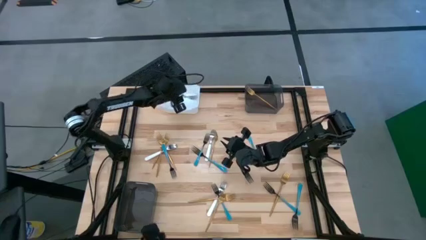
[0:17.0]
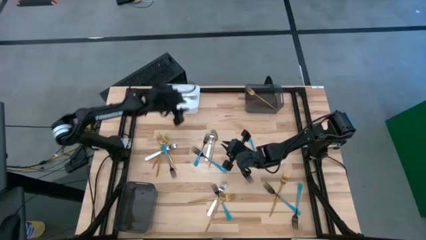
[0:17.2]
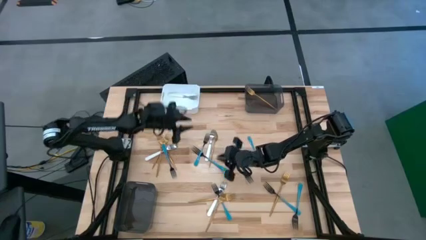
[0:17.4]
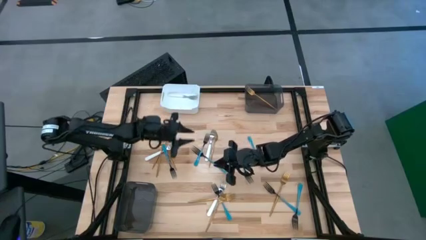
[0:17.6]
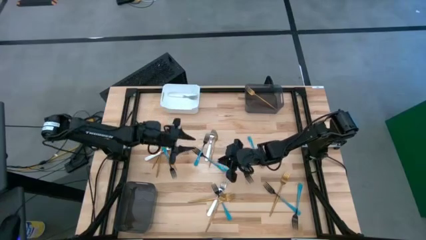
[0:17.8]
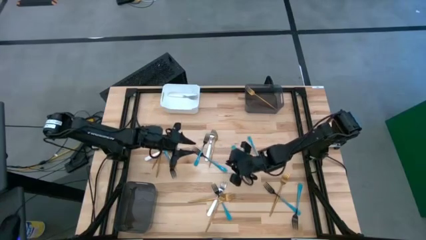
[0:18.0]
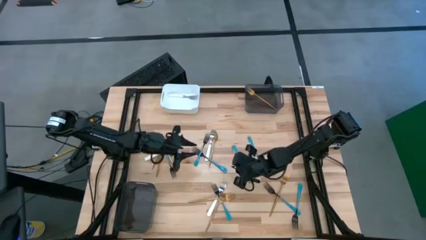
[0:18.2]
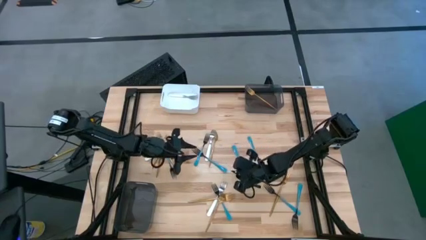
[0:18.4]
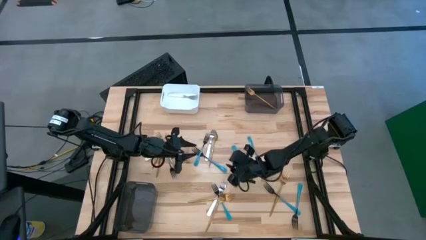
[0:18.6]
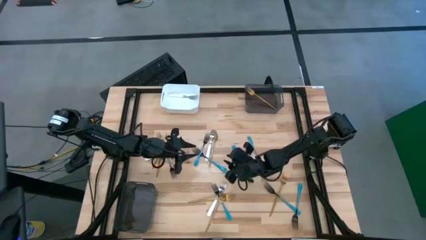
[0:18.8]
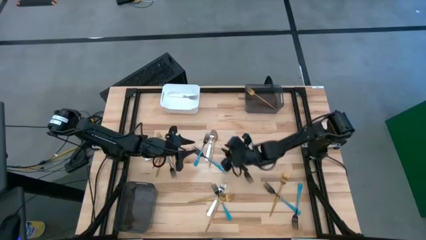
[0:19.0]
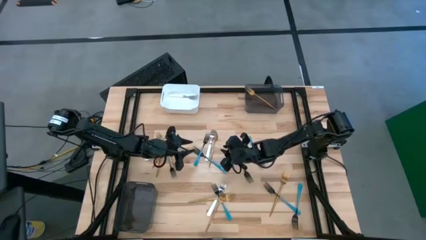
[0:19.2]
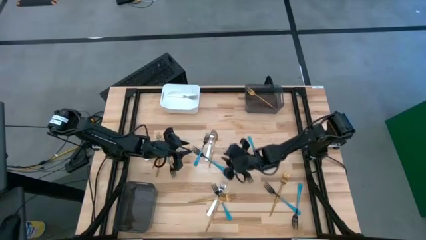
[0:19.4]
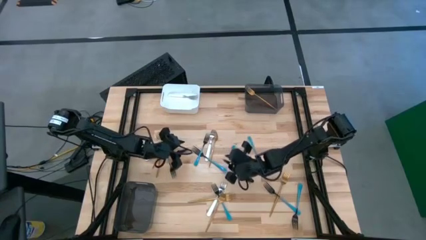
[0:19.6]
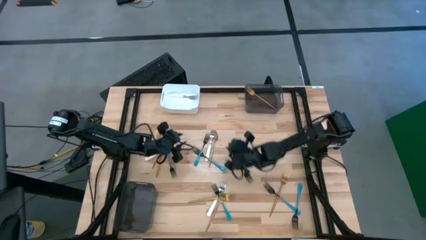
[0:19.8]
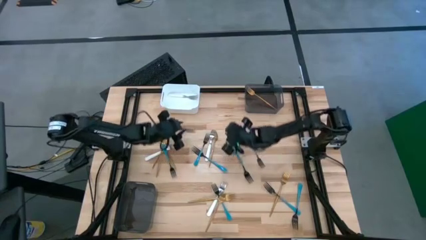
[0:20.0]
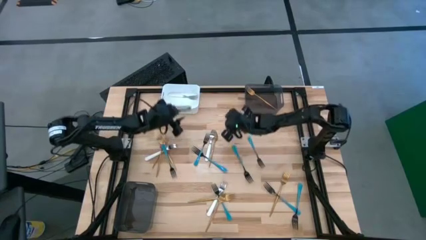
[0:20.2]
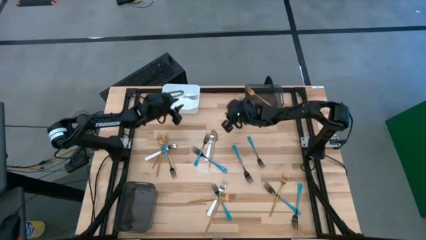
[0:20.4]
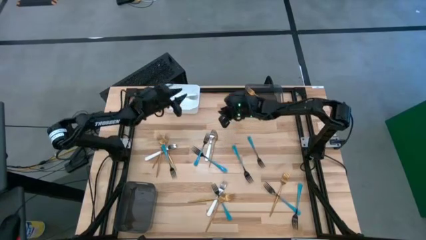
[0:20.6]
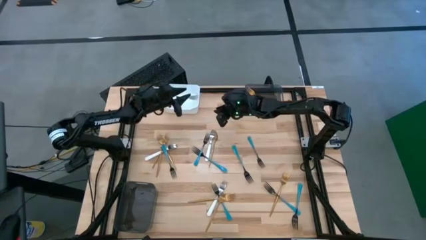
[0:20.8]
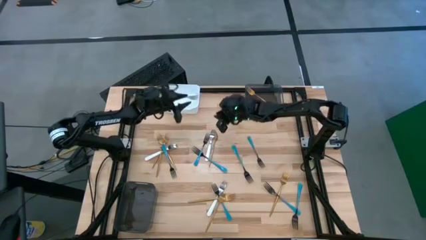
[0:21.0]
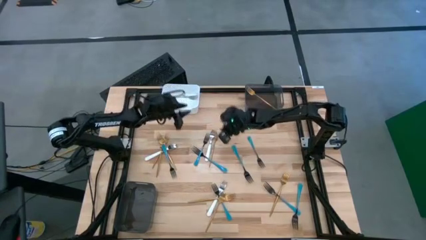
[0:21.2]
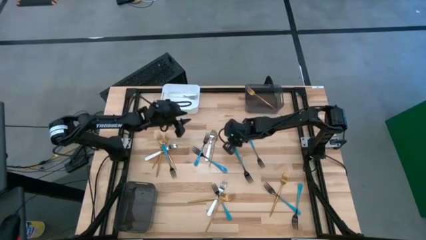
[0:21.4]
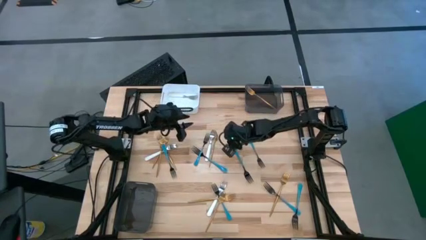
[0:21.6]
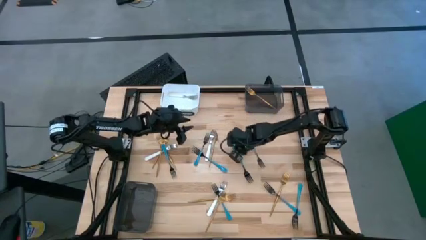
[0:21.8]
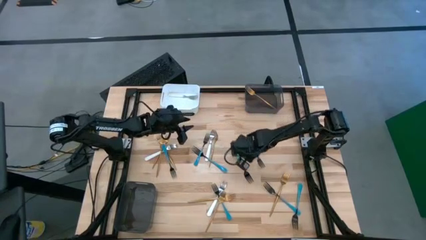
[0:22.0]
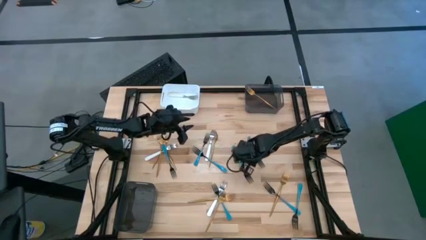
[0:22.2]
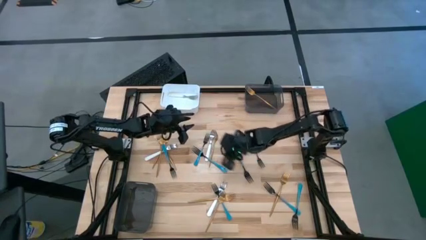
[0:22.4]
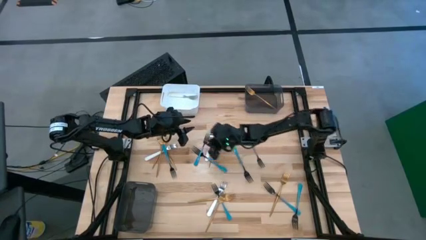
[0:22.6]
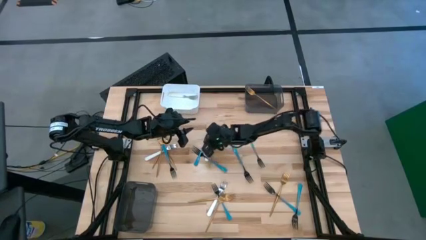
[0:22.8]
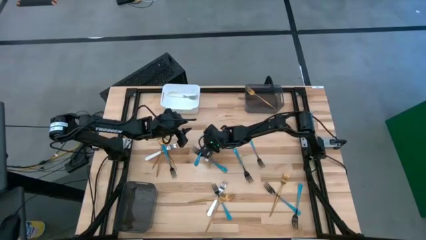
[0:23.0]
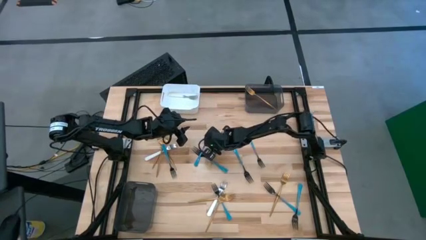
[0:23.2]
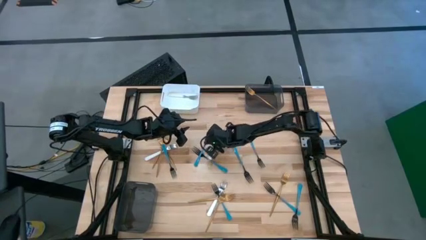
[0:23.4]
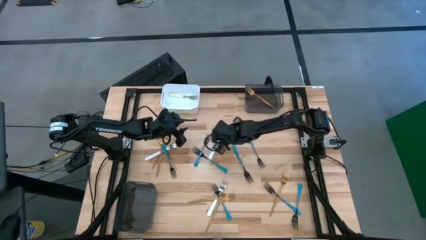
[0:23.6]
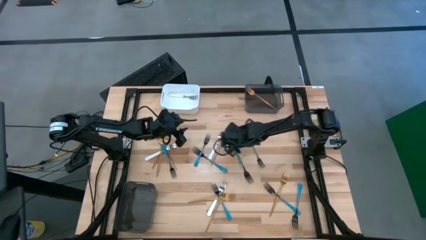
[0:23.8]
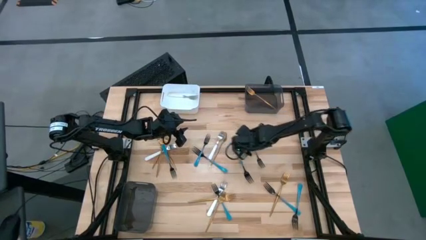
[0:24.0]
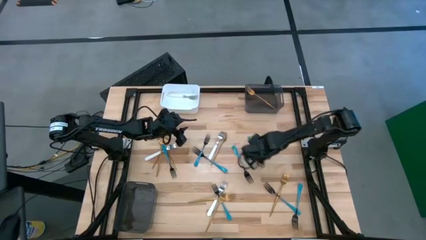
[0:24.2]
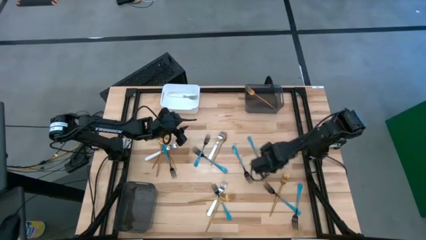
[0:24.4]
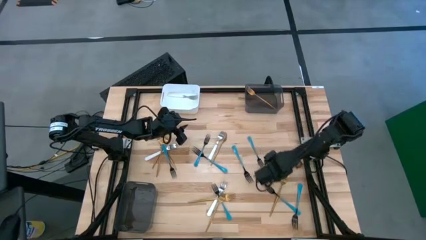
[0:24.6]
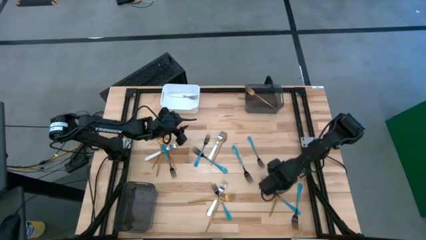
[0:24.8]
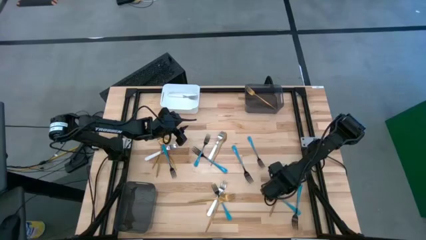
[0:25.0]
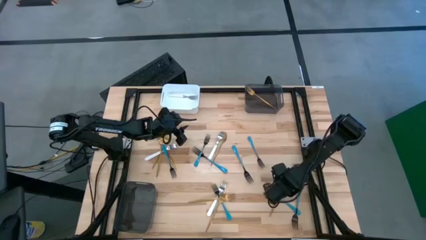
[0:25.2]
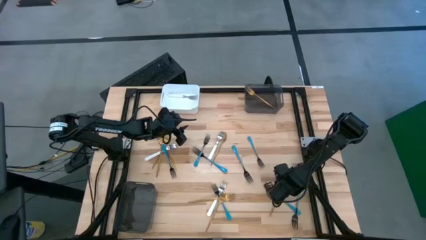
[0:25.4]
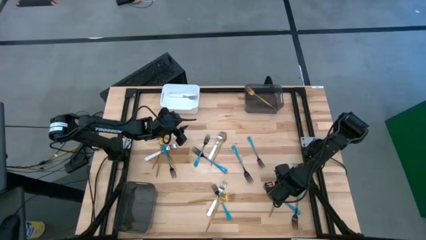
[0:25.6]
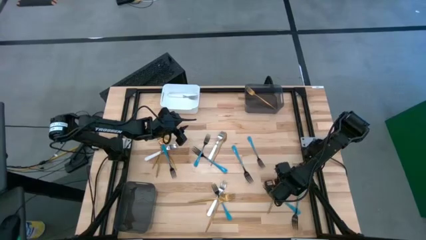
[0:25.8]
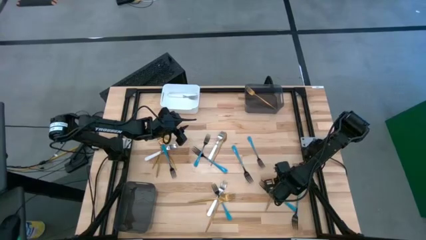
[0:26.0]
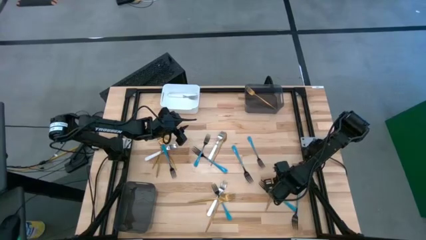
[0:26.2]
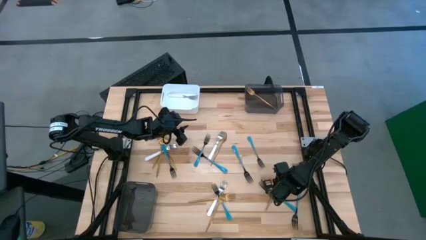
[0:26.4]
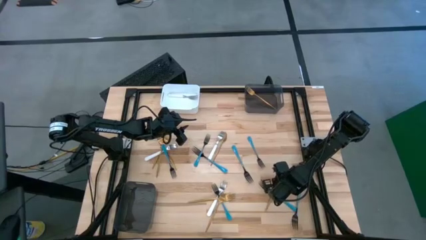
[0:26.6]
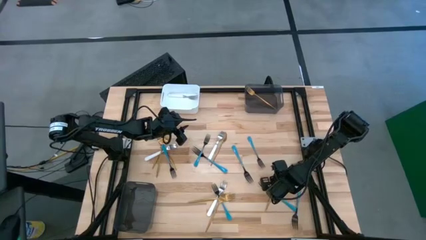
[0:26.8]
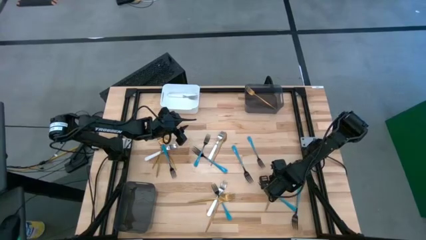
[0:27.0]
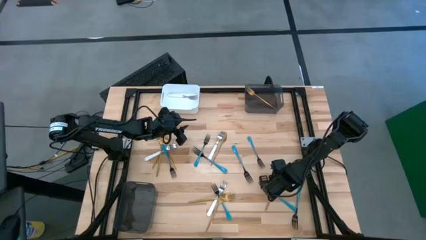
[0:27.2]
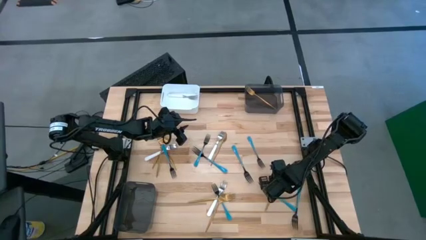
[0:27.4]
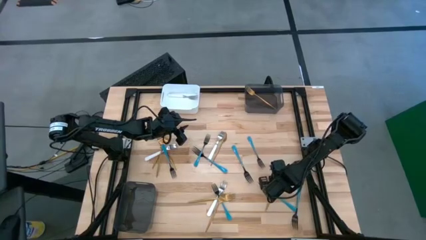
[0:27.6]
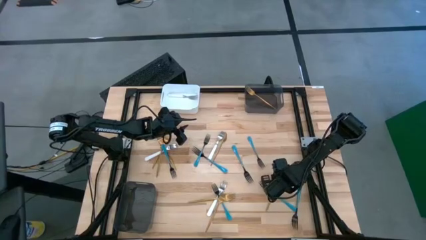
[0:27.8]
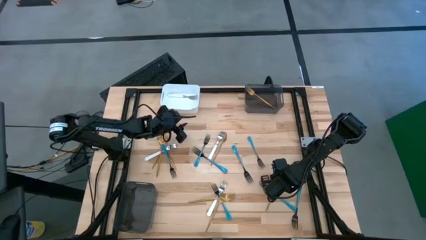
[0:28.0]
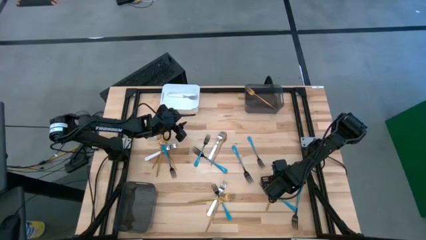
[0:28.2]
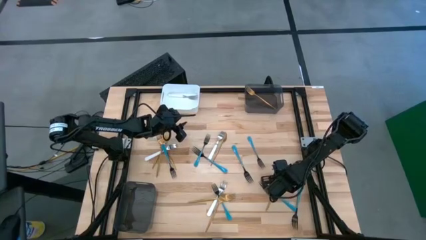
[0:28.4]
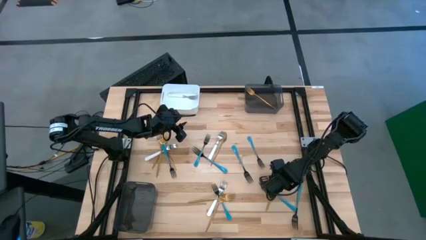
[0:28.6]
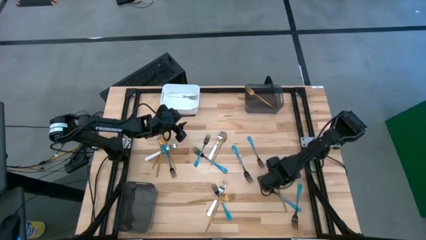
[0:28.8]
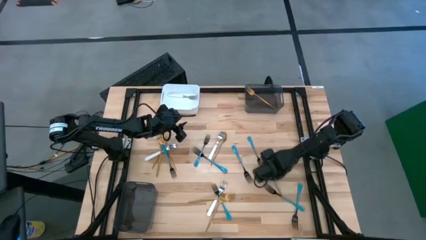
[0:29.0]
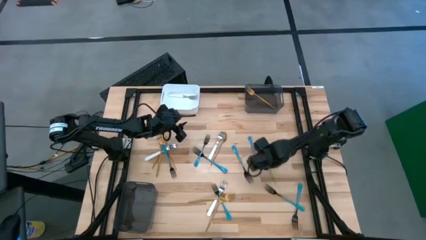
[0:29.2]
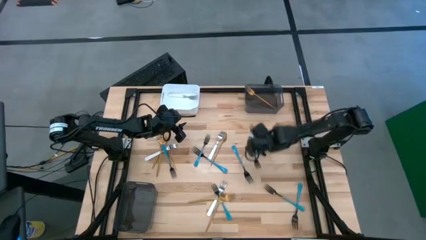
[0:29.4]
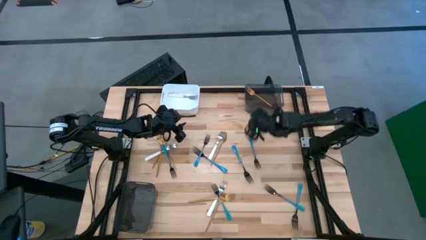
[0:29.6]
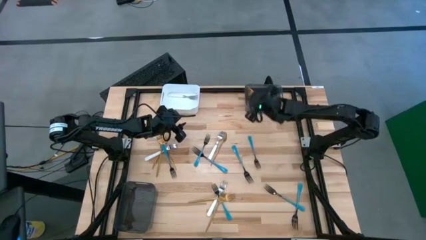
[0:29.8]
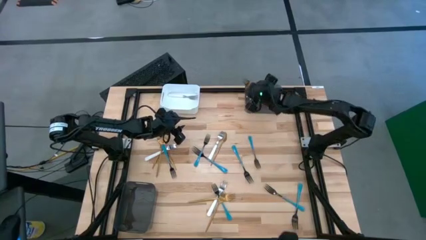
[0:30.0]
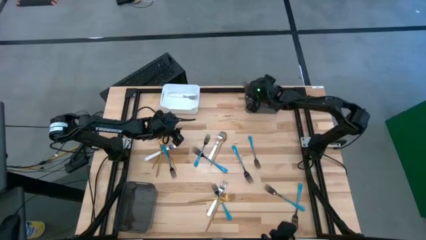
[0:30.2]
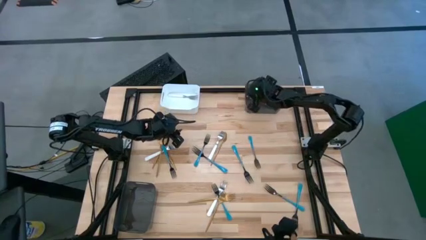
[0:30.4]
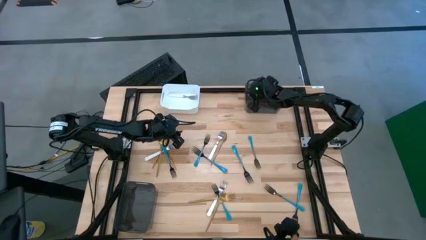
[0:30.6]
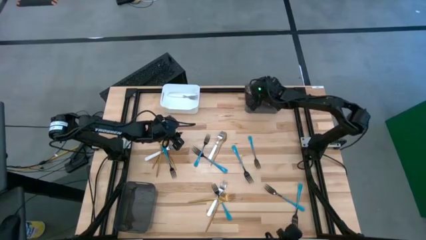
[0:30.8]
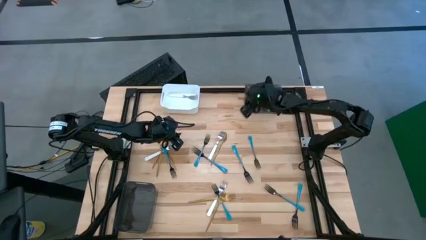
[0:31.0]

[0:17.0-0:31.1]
Task: Sort silverware by color (type)
Put the gold fork into the top black bin

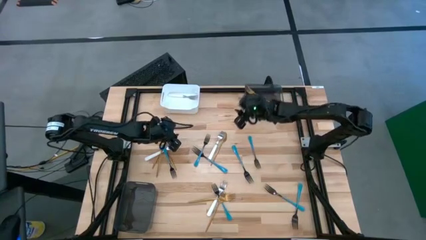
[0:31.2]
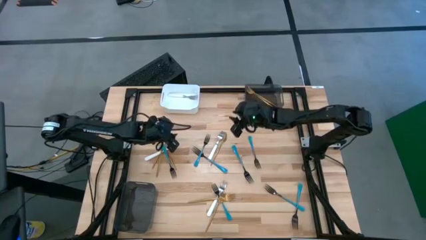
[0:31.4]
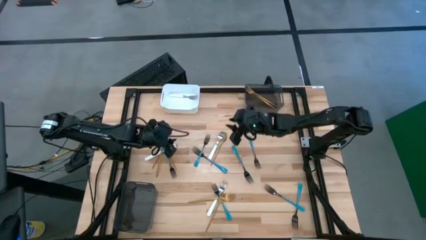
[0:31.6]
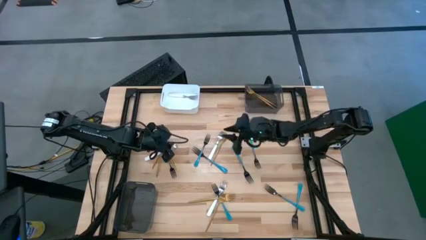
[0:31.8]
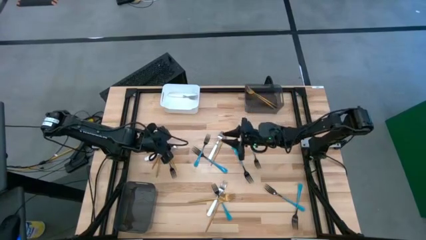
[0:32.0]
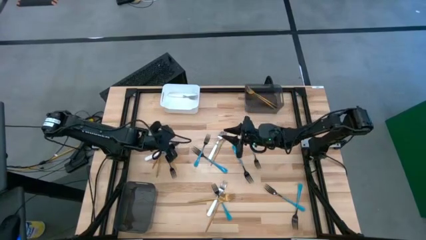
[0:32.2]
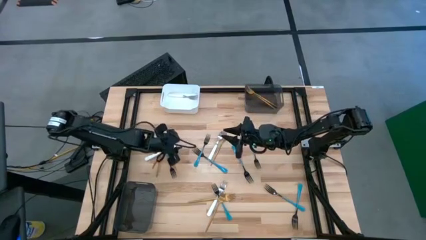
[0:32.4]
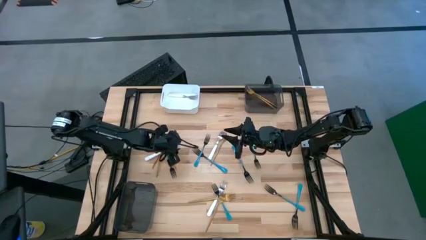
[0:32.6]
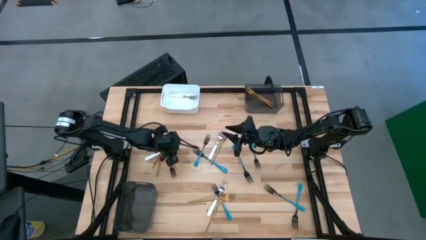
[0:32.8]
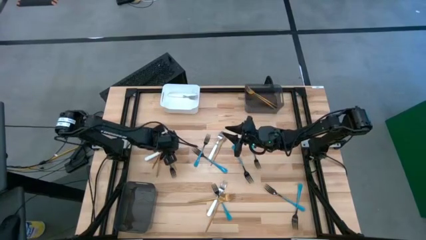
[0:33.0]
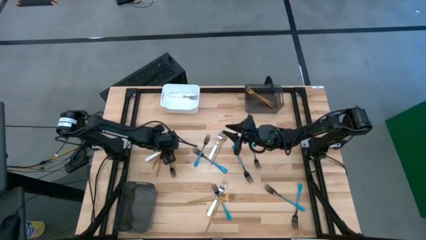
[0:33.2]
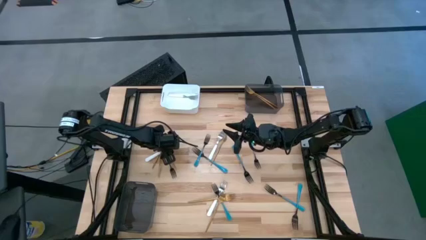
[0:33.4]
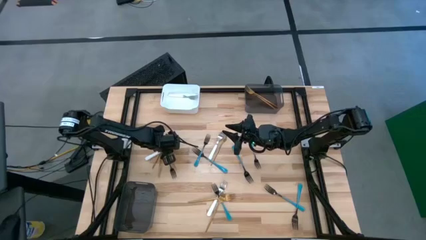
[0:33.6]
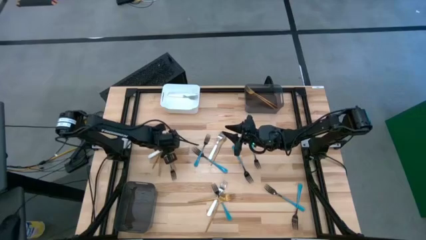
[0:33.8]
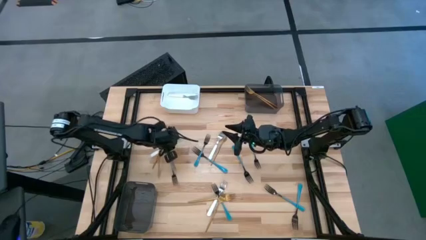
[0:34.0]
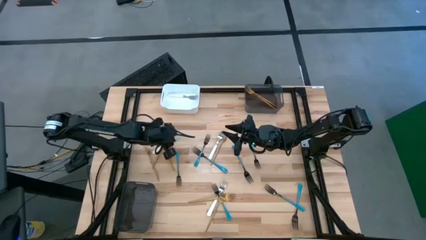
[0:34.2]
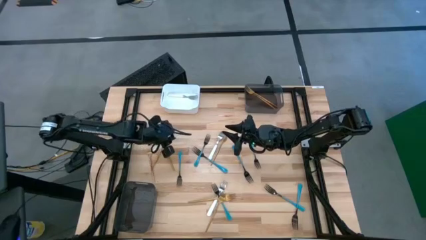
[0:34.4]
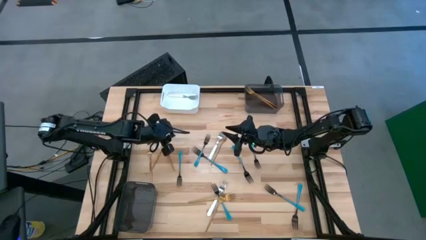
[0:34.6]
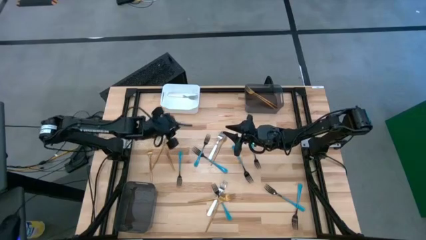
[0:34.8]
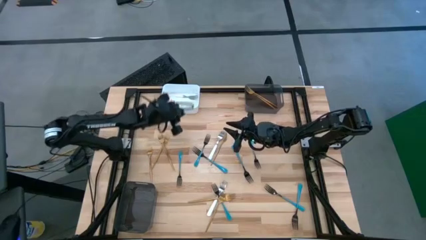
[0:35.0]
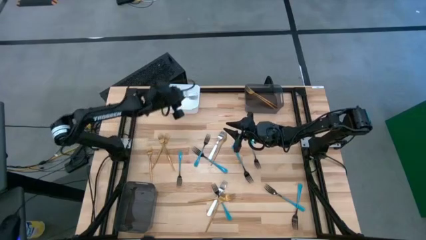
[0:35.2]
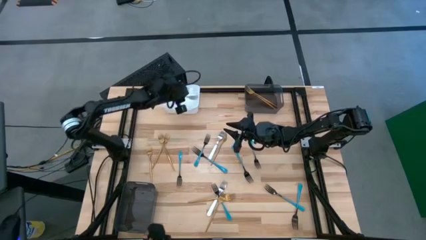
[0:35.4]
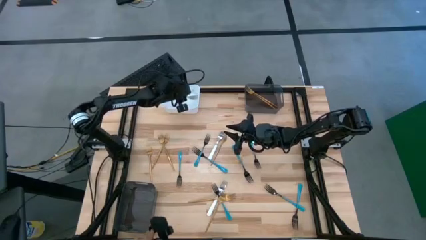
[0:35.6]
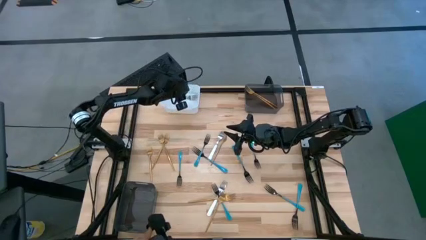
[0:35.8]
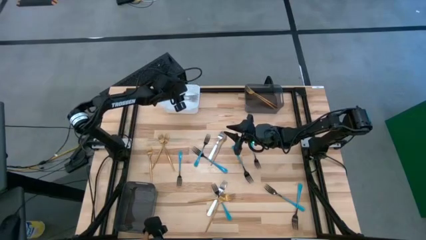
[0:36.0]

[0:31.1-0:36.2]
Put the white fork into the white bin
